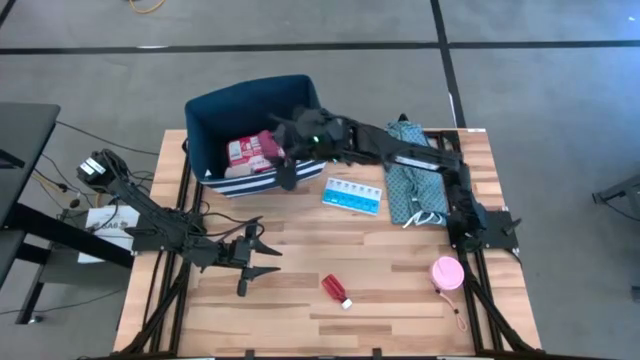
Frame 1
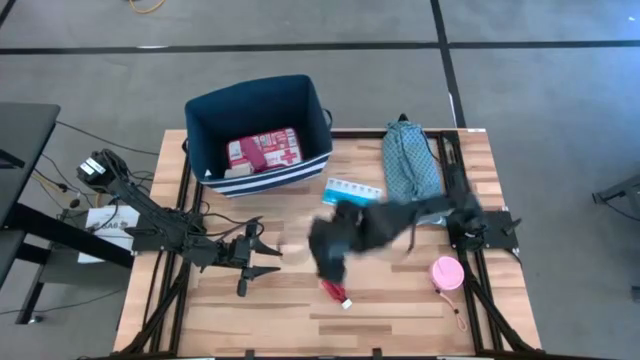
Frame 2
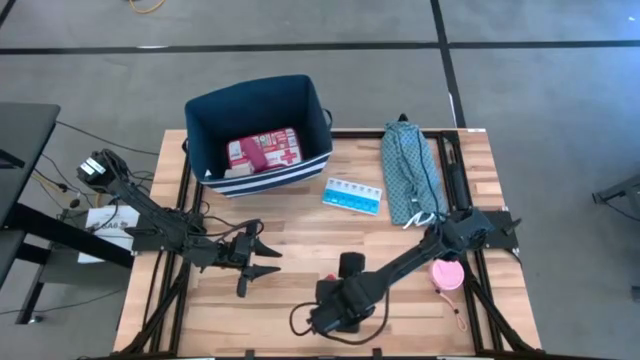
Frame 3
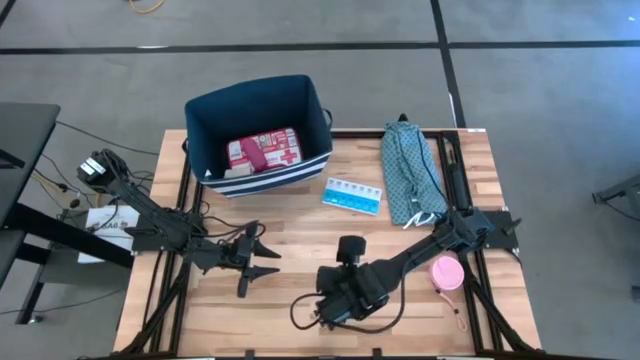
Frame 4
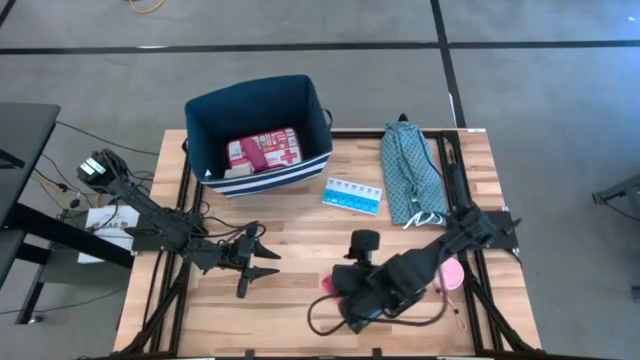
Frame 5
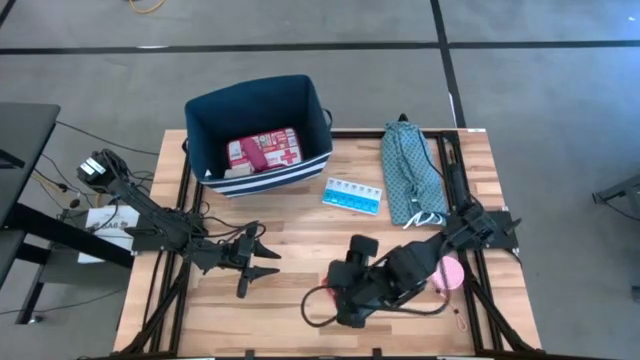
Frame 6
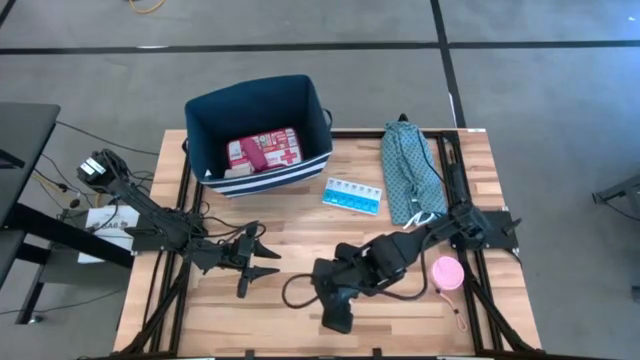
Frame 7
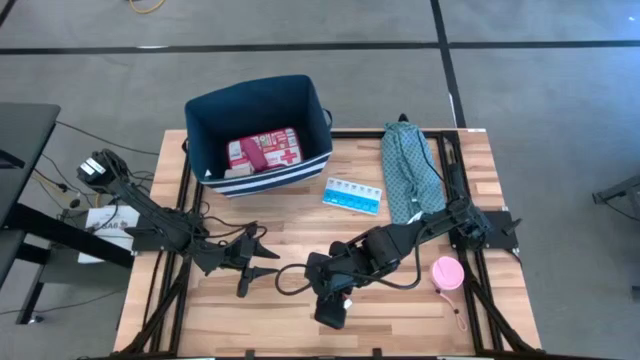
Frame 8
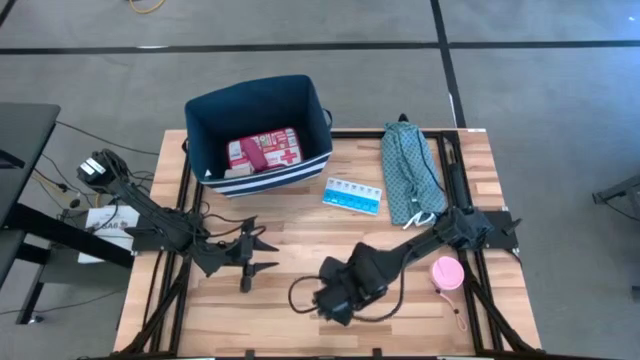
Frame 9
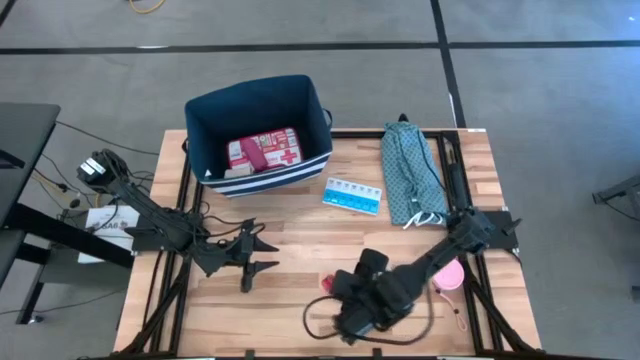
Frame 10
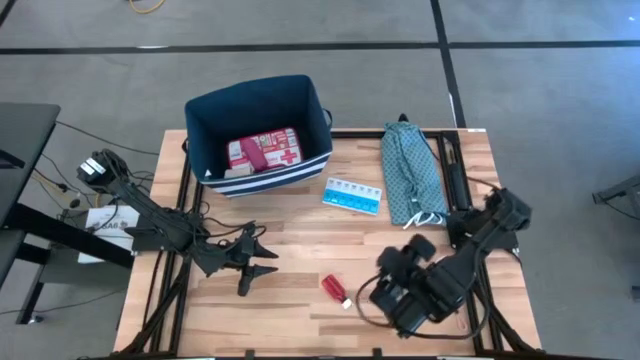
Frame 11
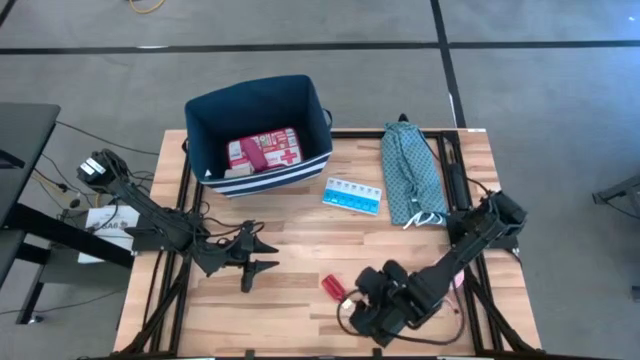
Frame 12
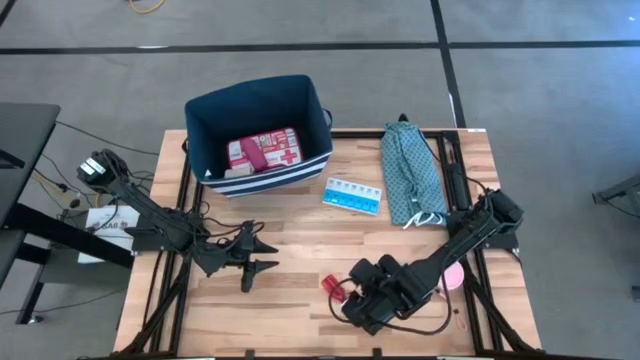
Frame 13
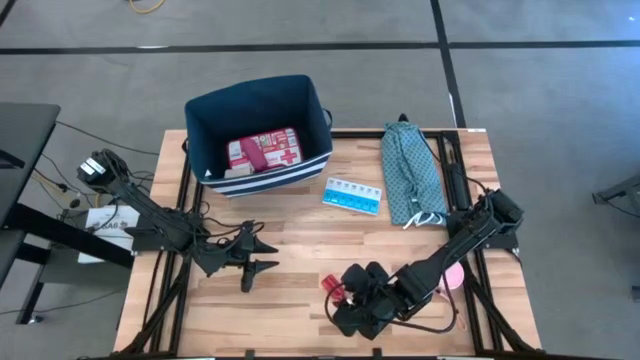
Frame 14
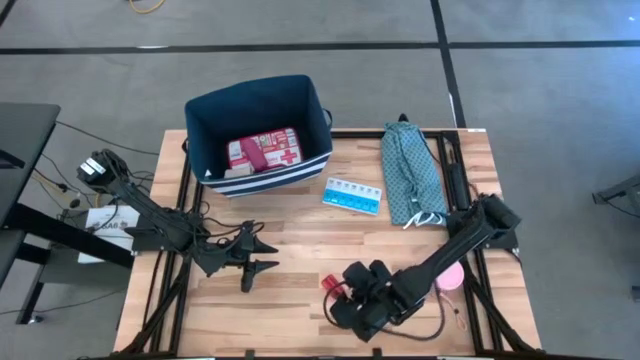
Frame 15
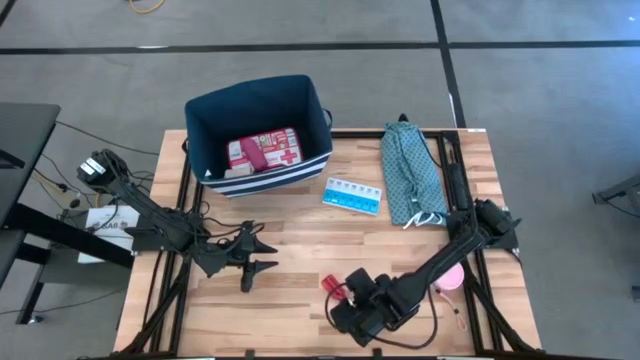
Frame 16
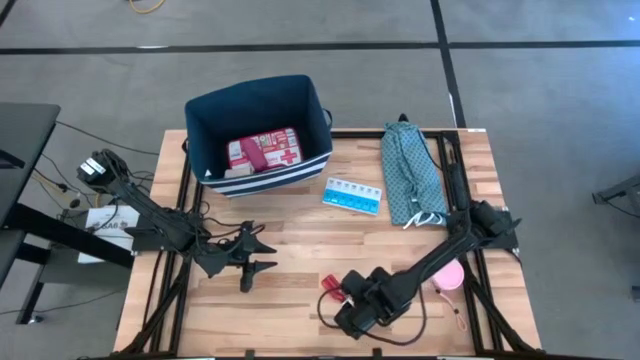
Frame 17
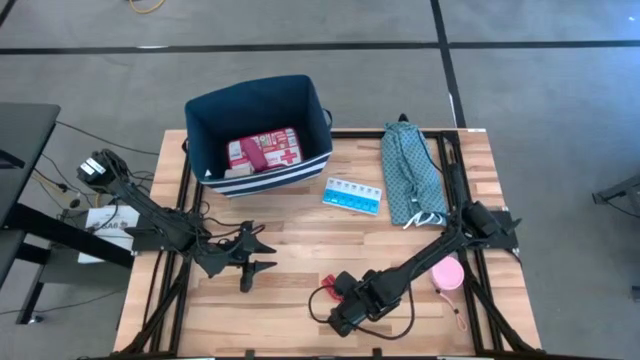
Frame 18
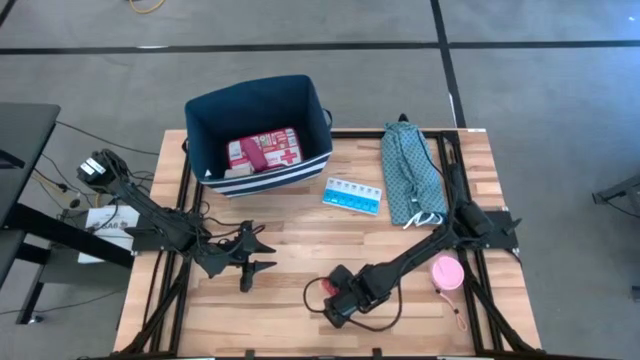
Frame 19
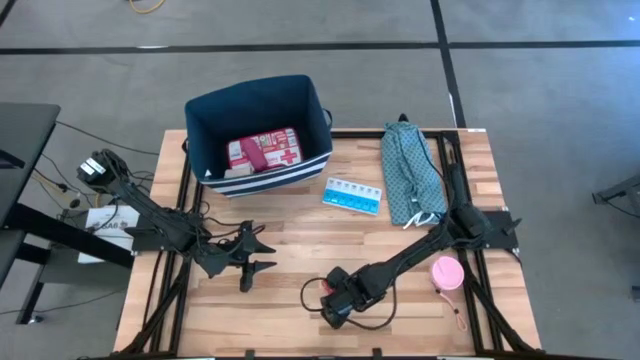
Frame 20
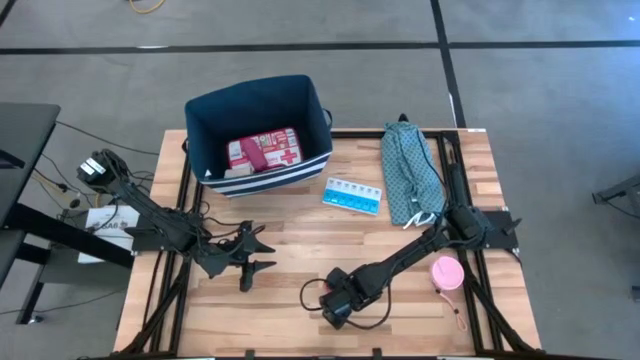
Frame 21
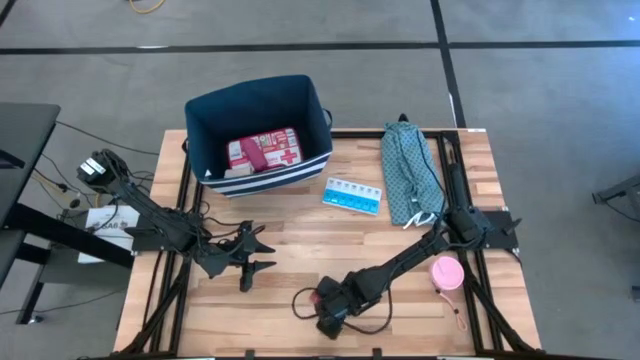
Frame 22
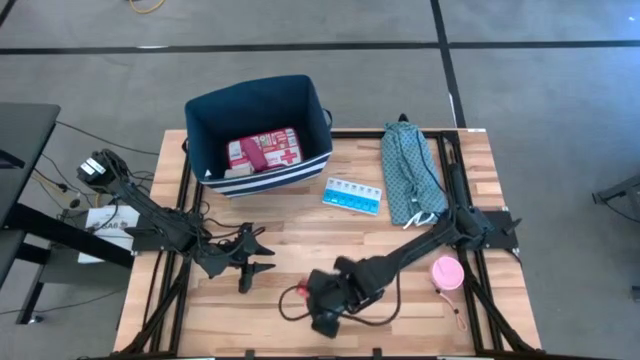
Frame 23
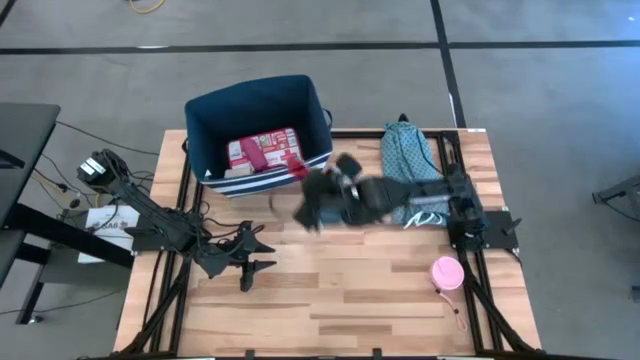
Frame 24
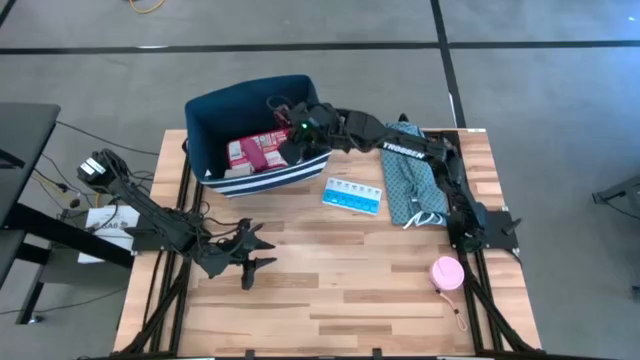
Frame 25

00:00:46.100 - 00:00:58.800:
Task: Pick & place medical supplies in basket/bin
Put the red medicine bottle into the blue bin

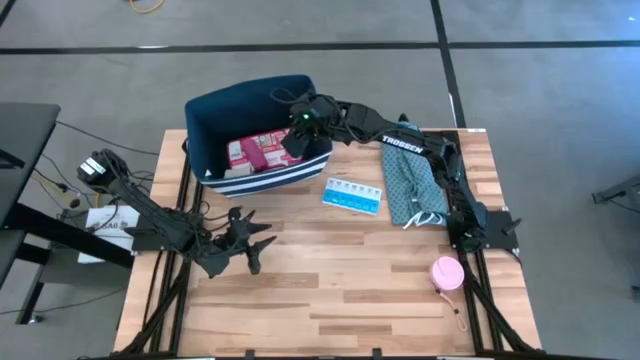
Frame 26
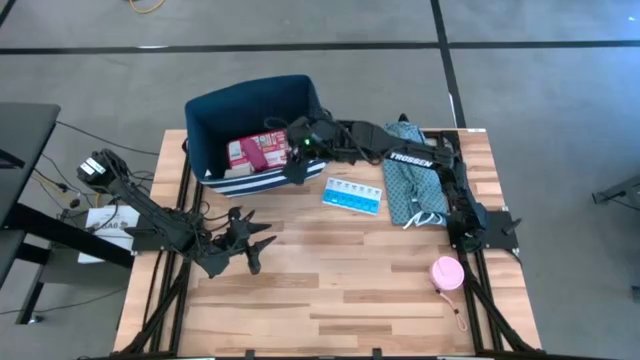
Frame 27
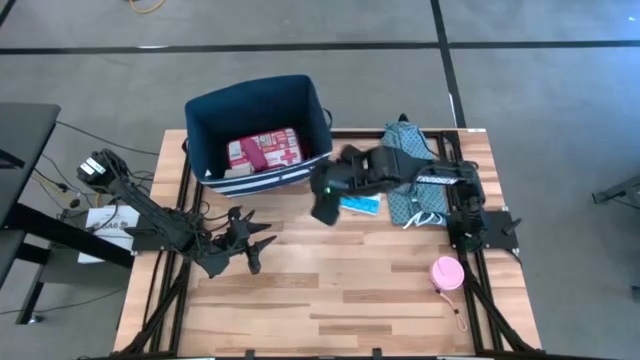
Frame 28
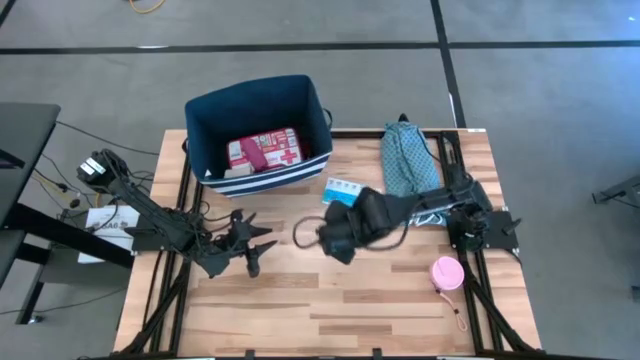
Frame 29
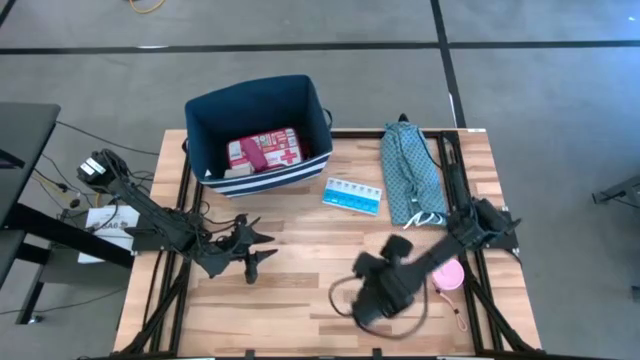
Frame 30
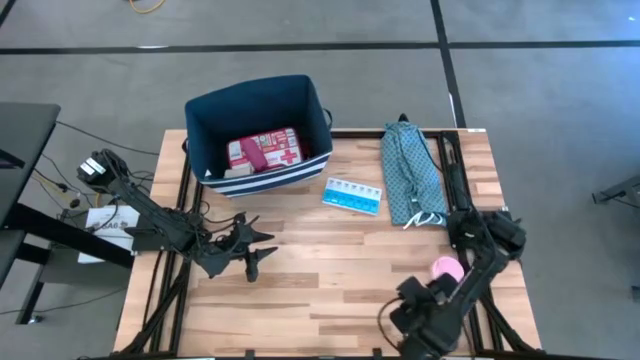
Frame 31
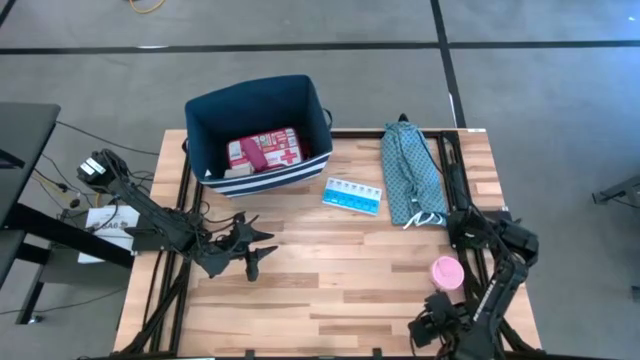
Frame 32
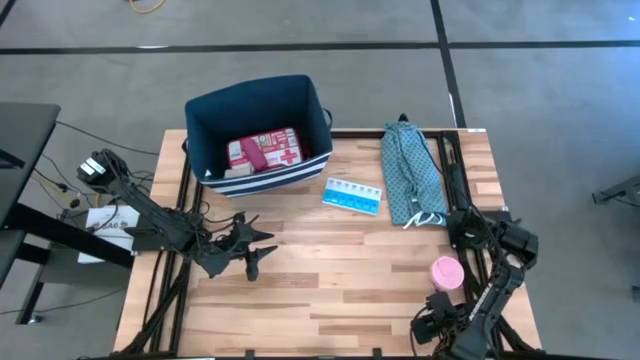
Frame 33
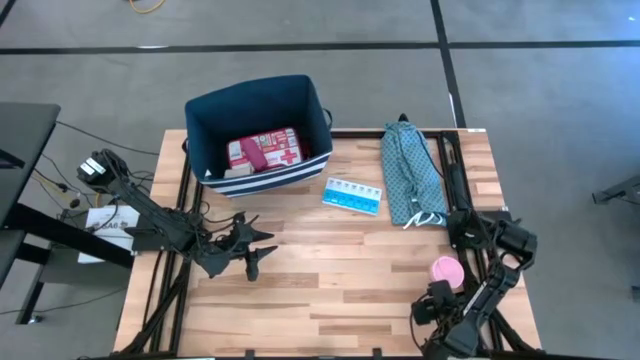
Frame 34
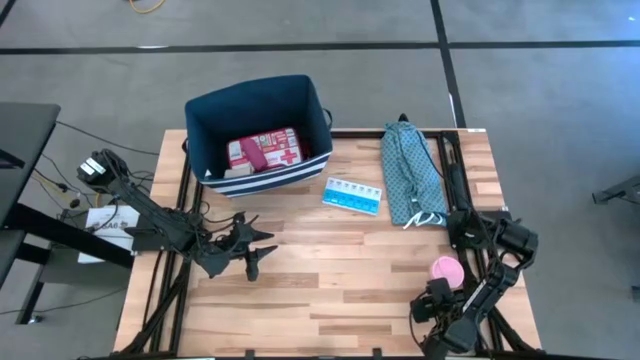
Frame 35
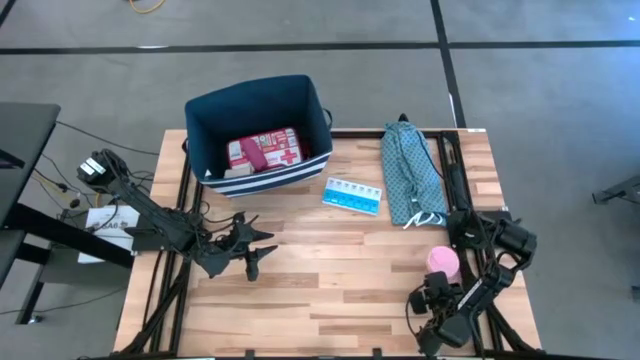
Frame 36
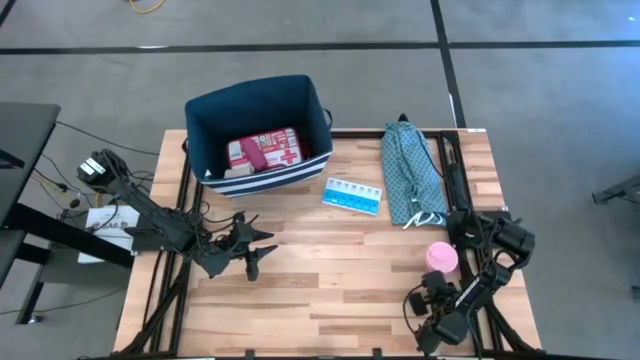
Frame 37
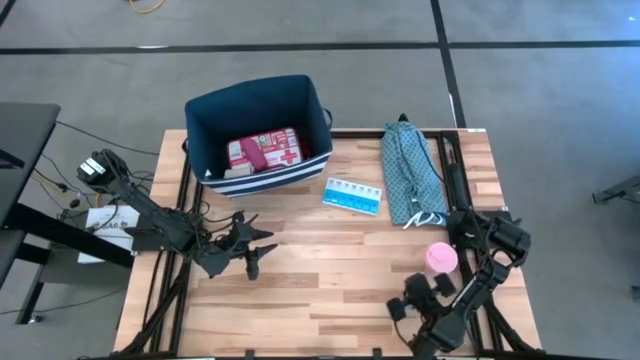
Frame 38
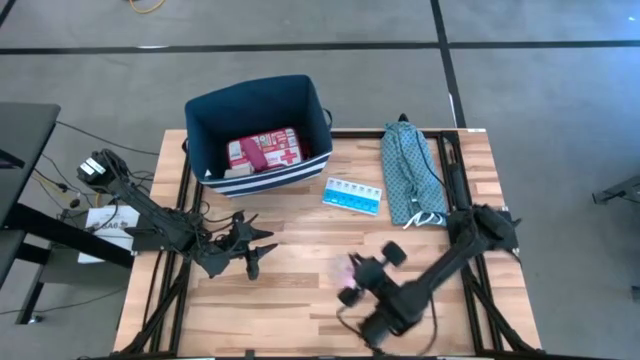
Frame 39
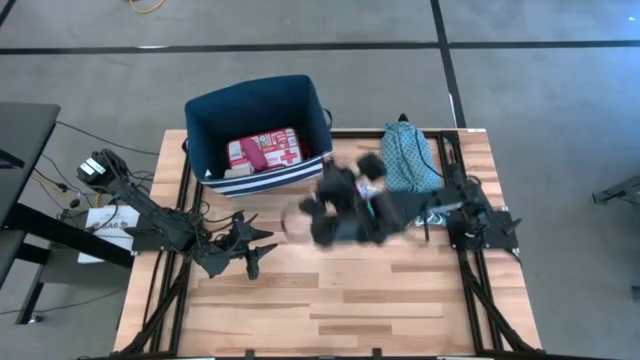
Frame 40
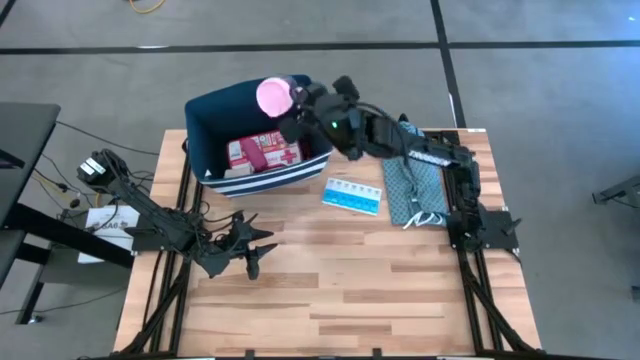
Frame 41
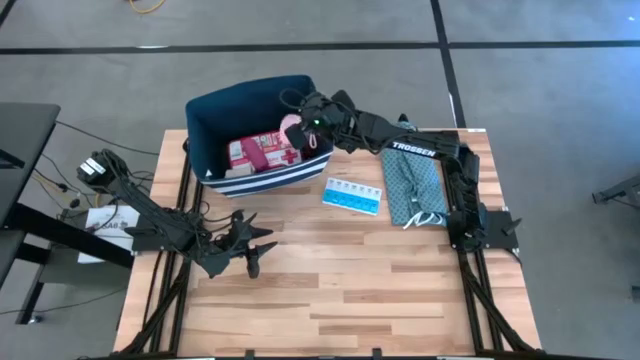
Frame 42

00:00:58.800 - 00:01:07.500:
Put the pink water bottle into the blue bin
